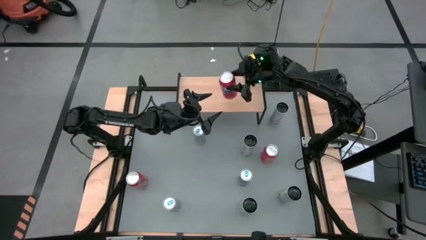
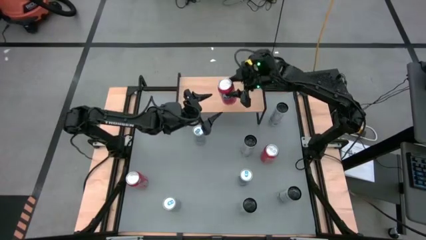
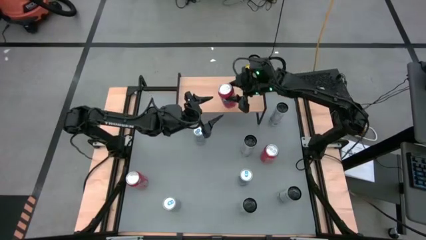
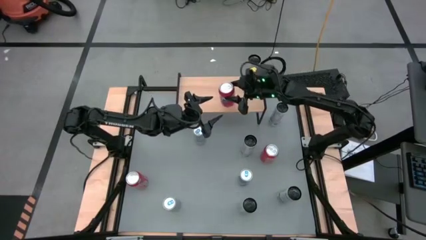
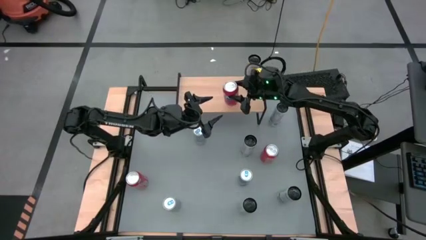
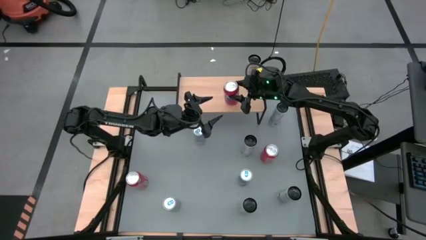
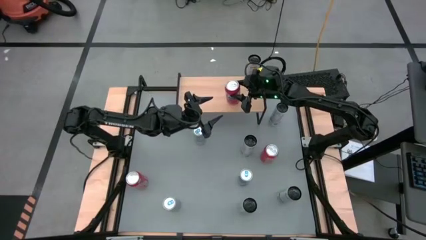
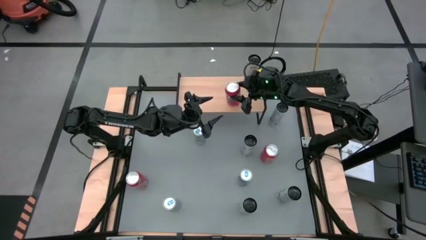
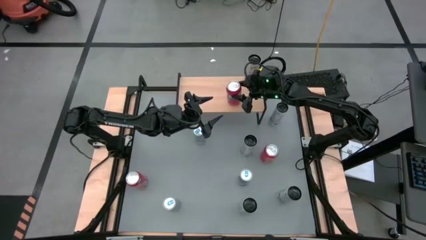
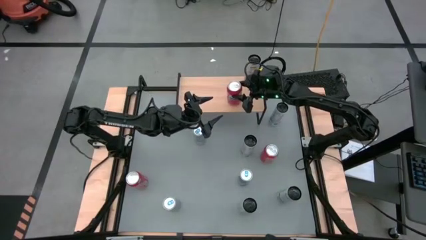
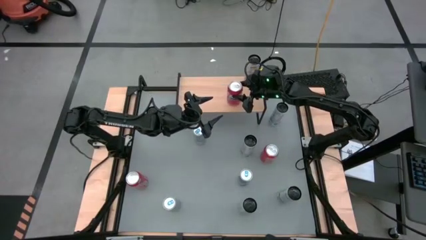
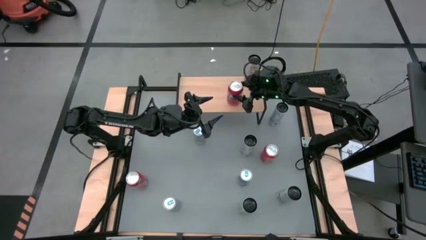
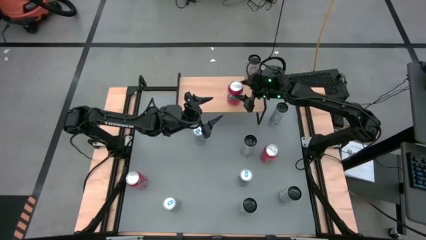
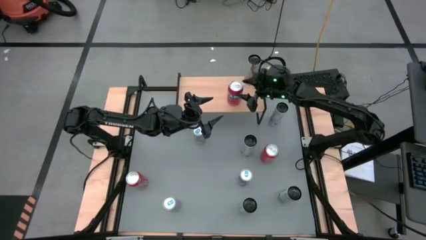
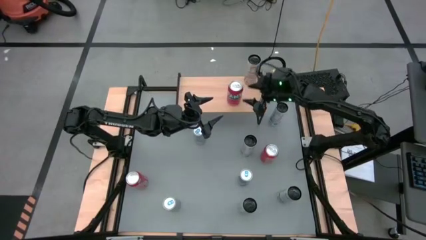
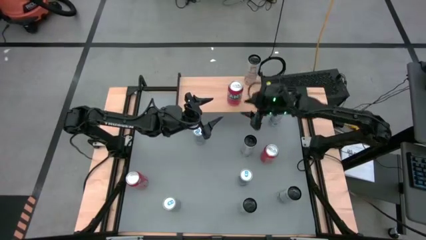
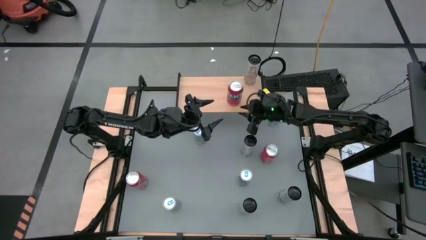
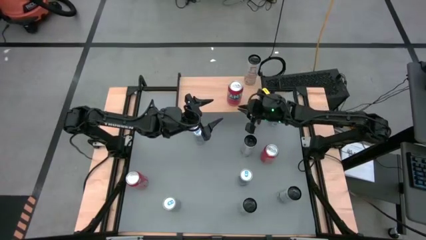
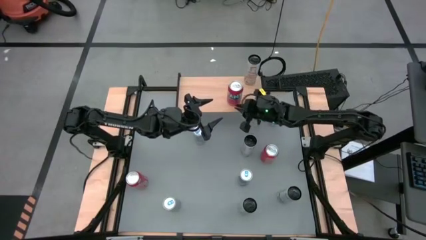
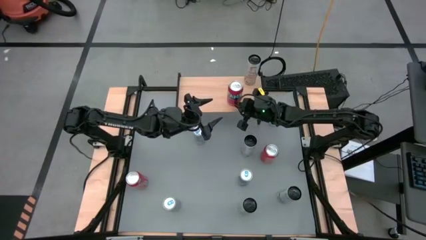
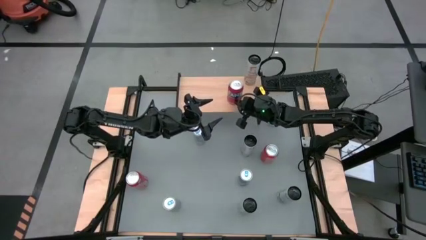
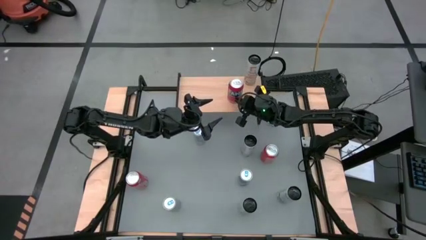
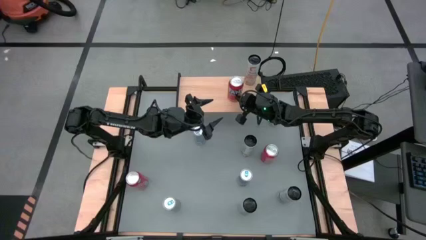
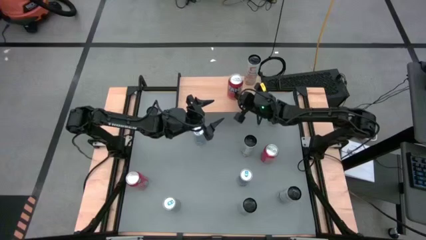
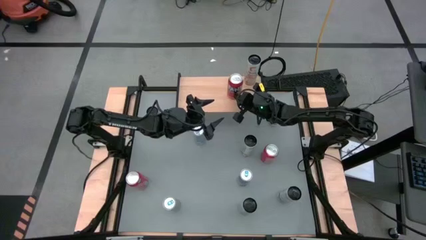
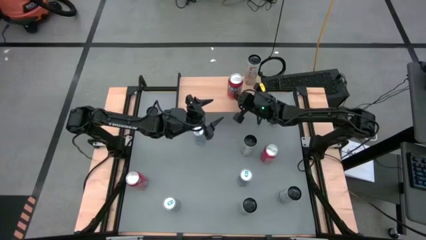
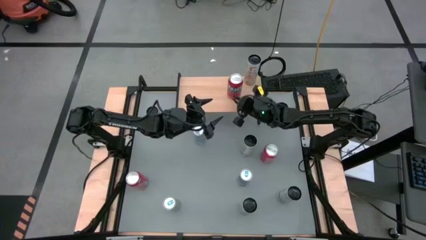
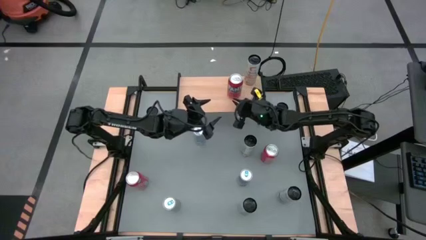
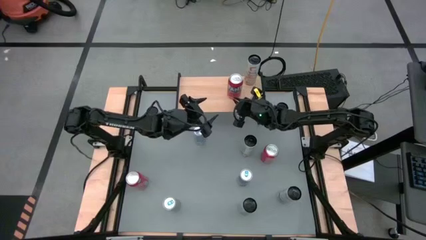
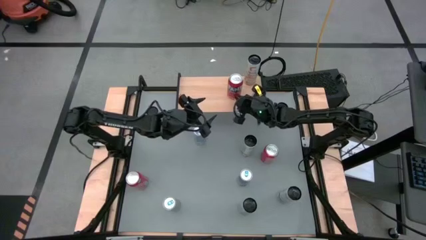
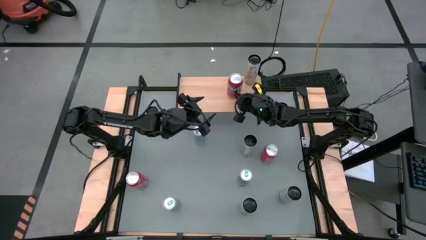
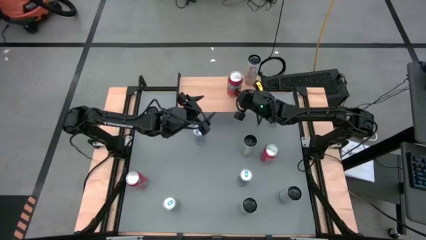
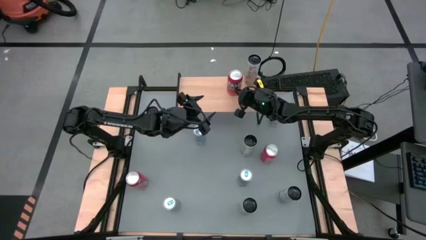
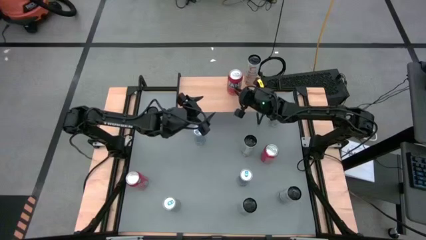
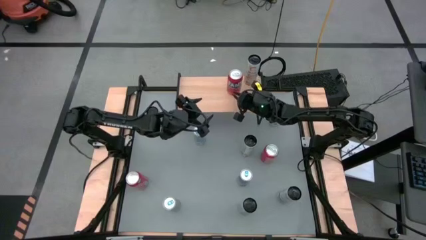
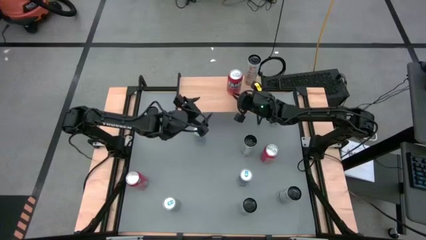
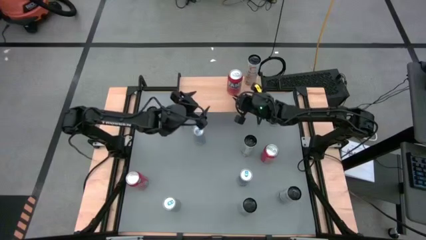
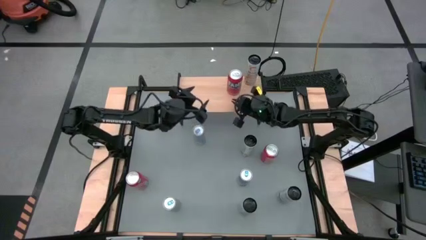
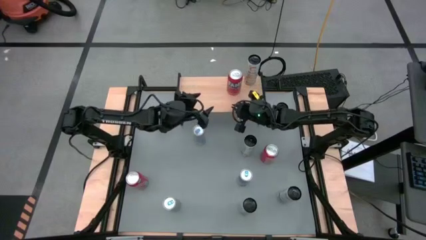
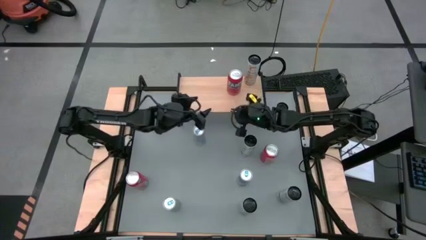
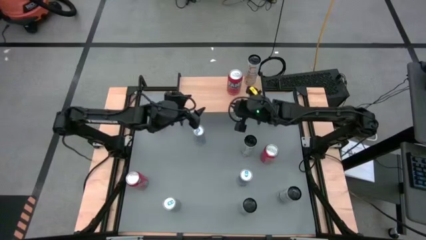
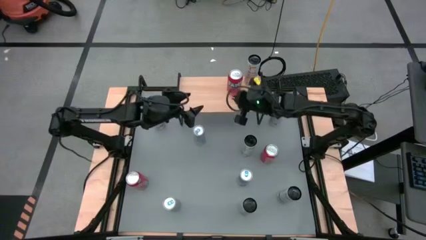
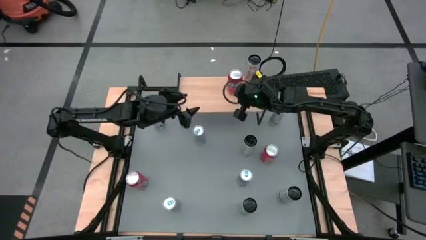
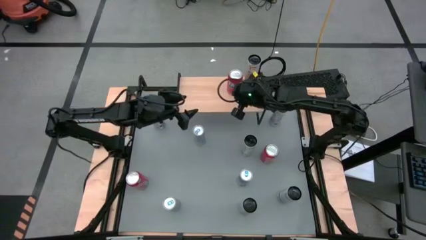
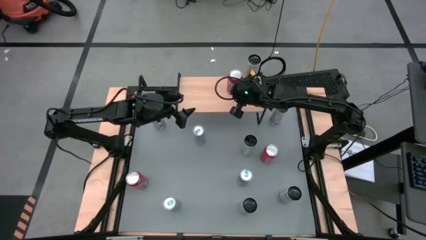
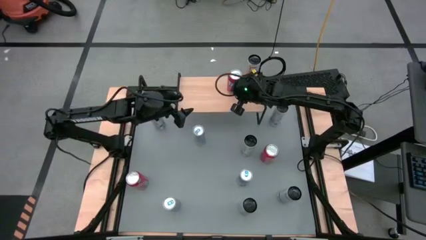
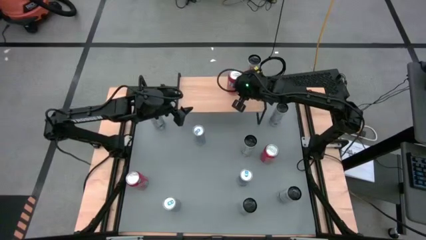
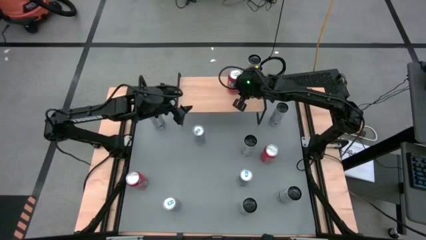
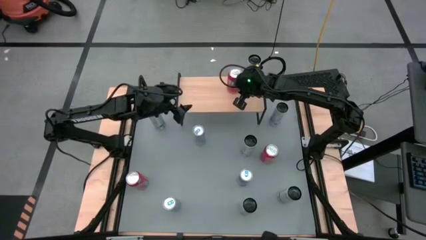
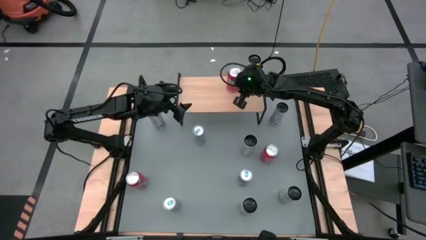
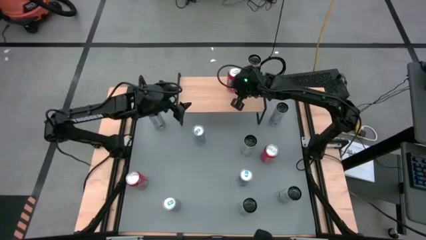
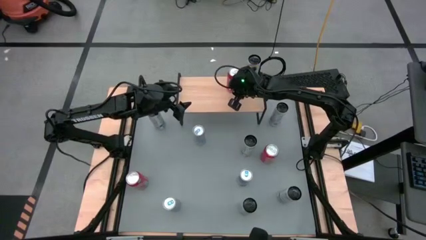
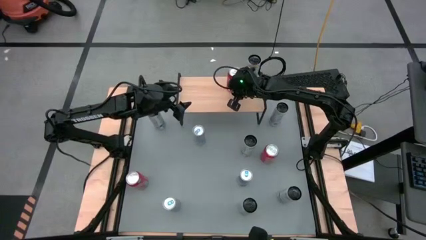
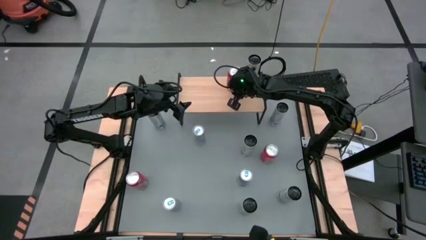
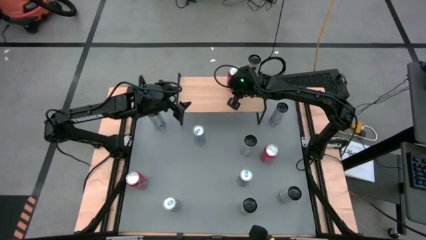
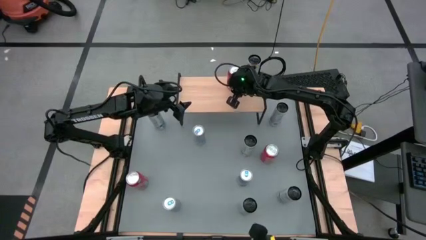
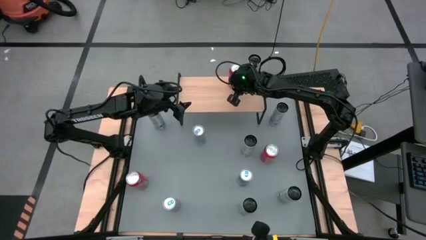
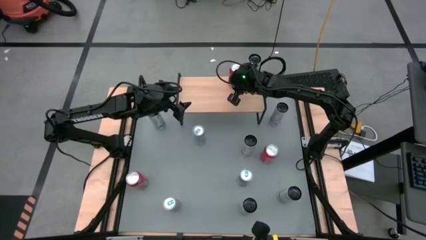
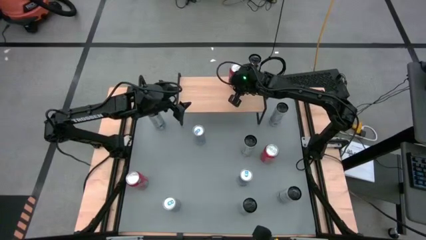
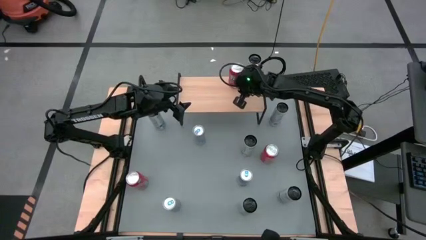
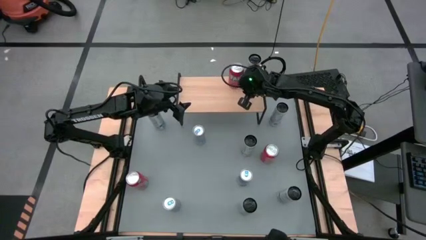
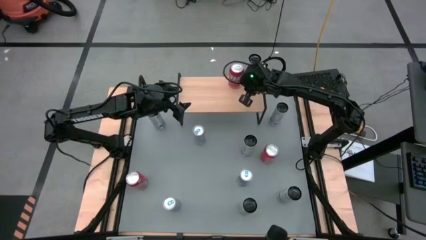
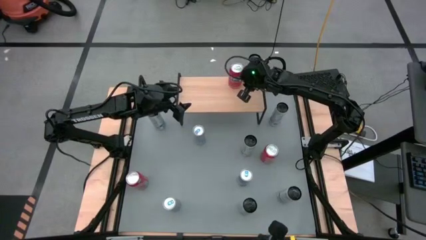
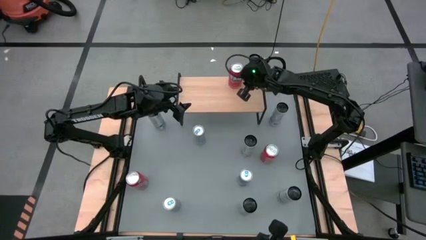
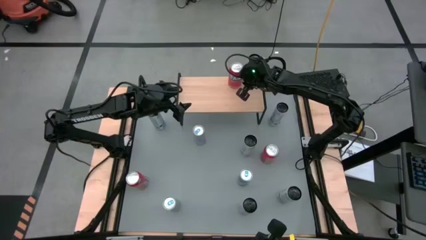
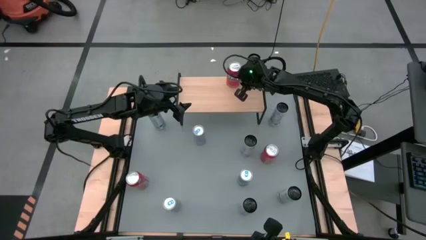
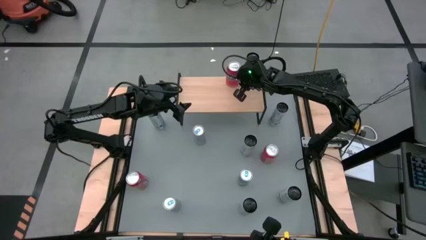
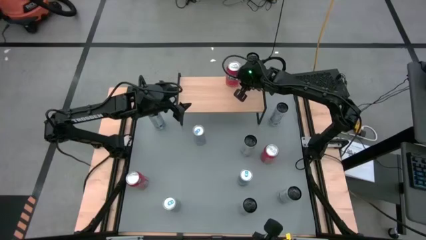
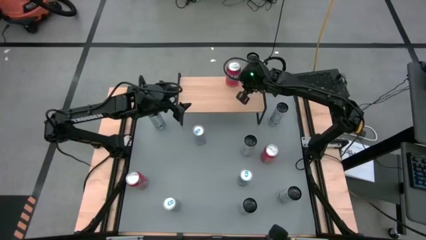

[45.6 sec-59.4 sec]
Task: Place canned beverage on shelf
Put the middle orange soda can on the shelf

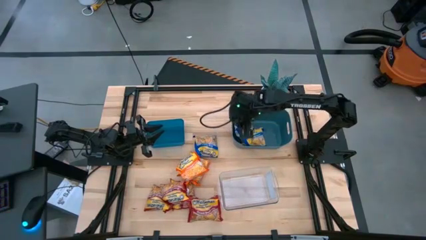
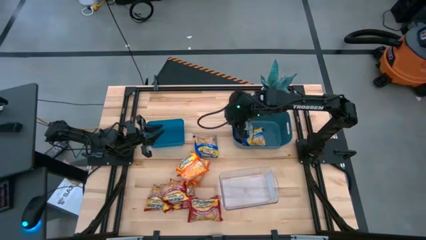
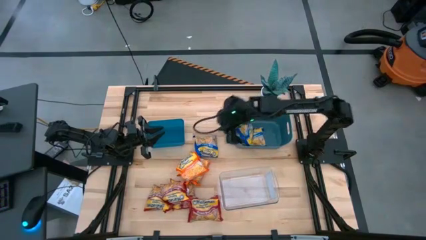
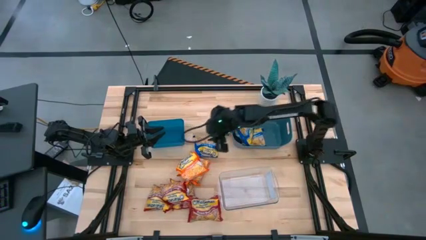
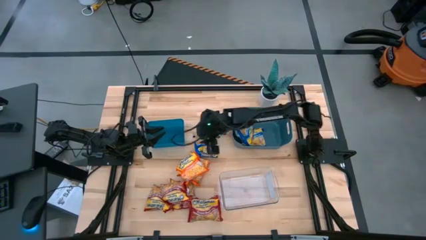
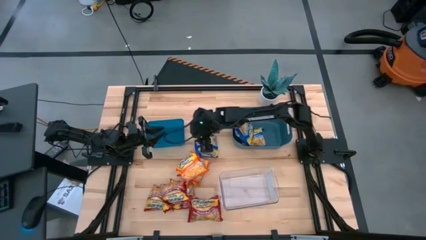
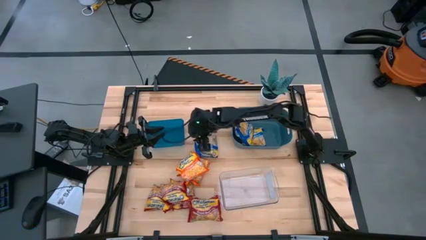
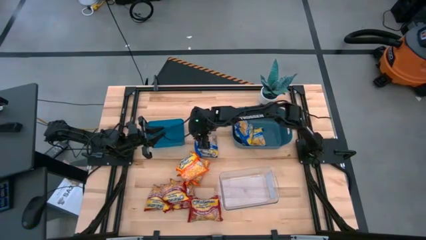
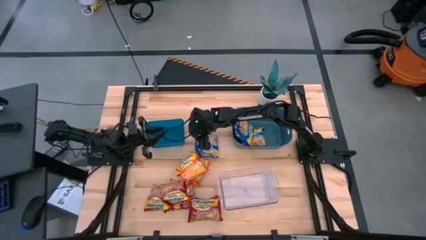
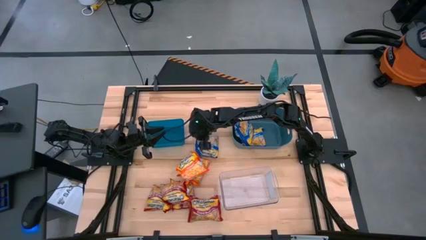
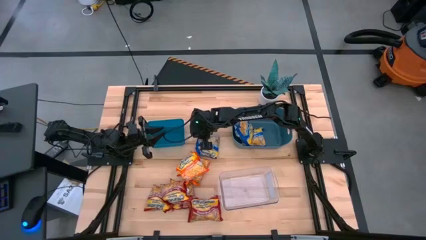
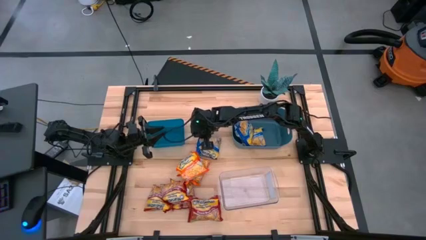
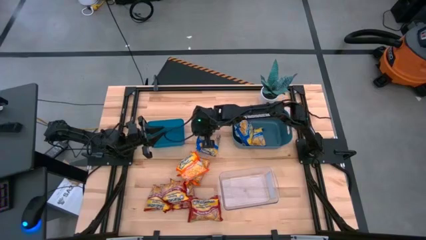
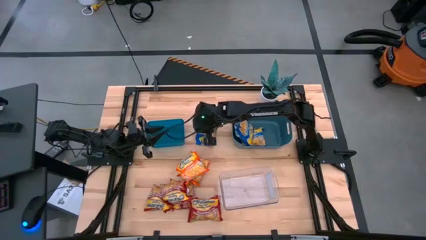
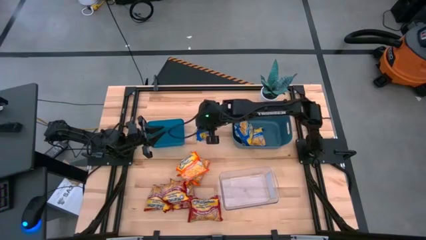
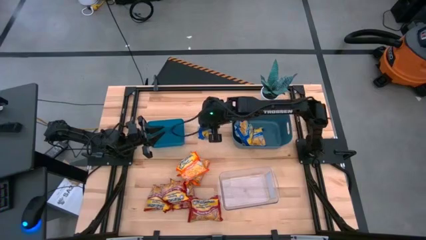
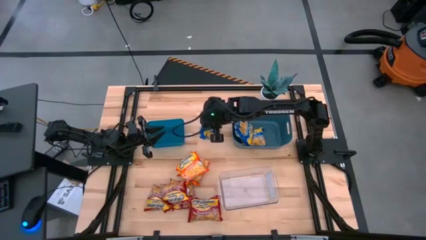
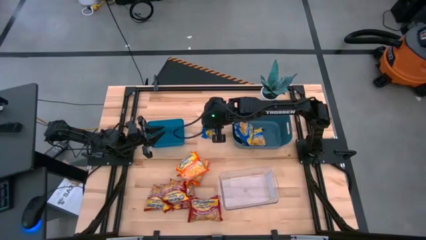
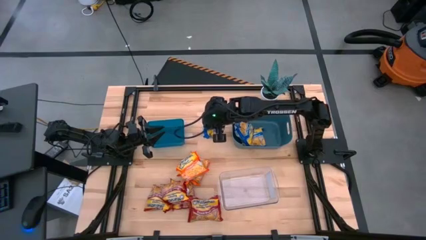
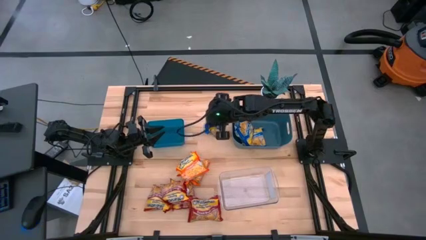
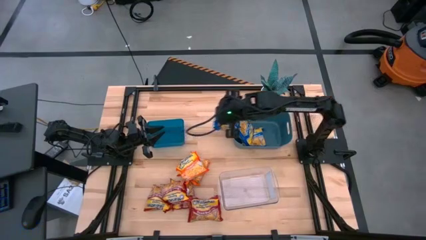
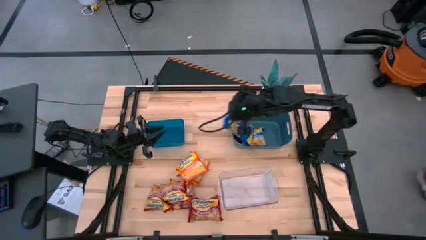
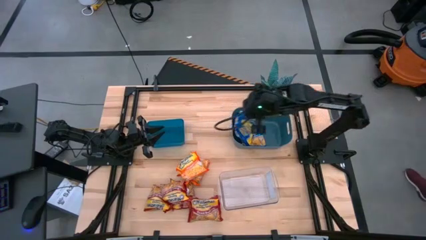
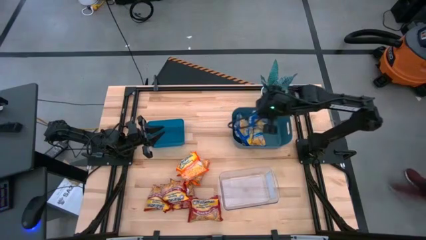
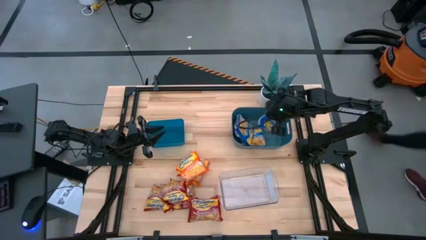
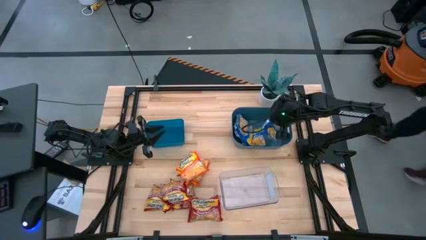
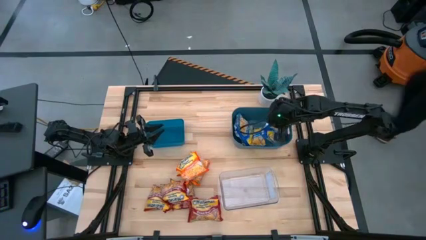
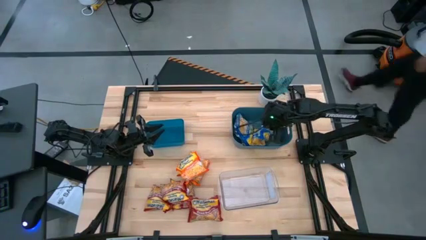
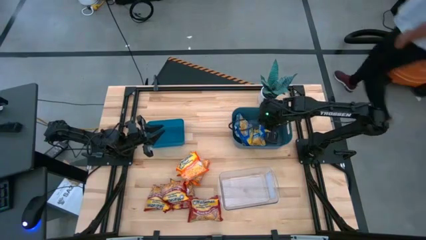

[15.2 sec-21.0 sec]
Task: Sort Maruchan noodles
Put the blue noodle pack into the dark blue bin
